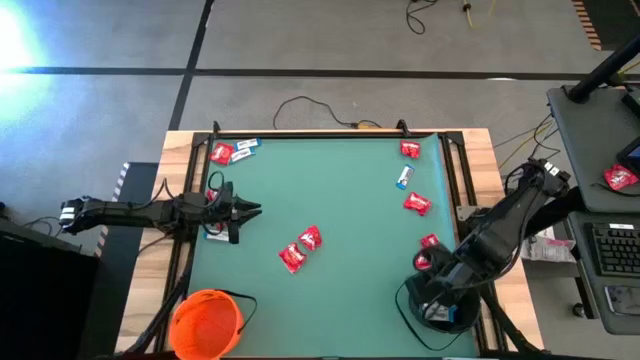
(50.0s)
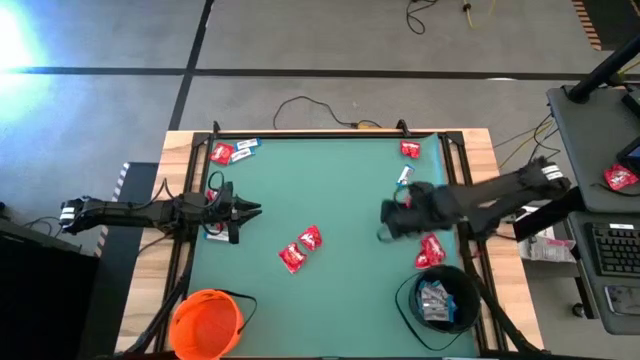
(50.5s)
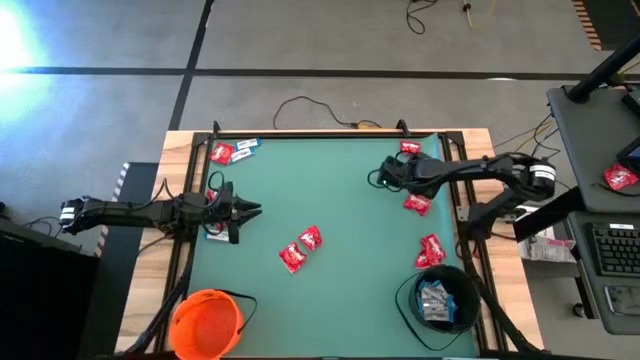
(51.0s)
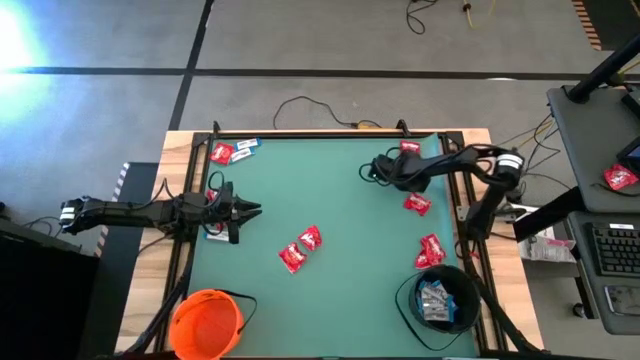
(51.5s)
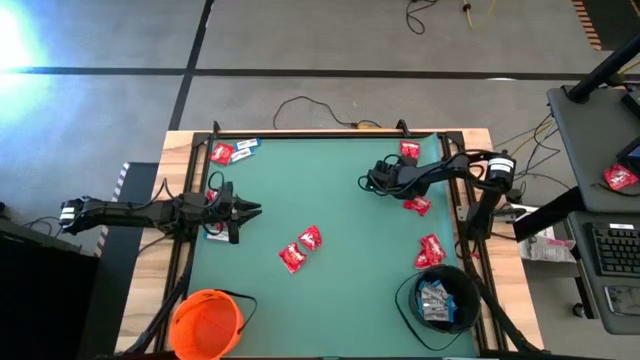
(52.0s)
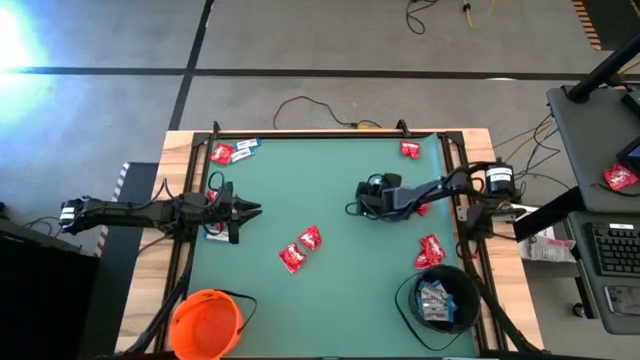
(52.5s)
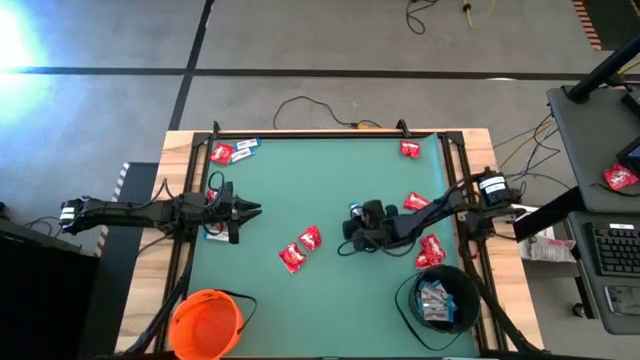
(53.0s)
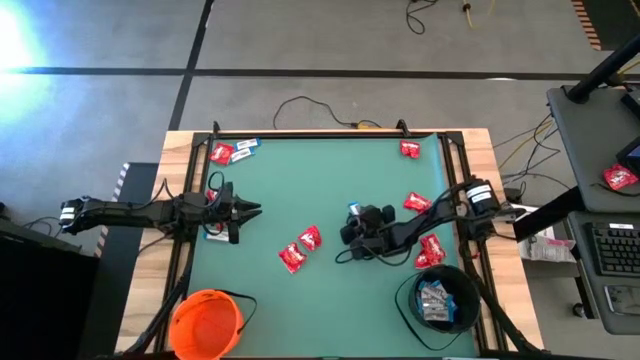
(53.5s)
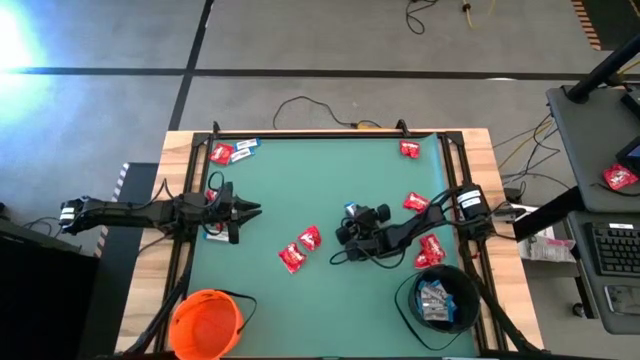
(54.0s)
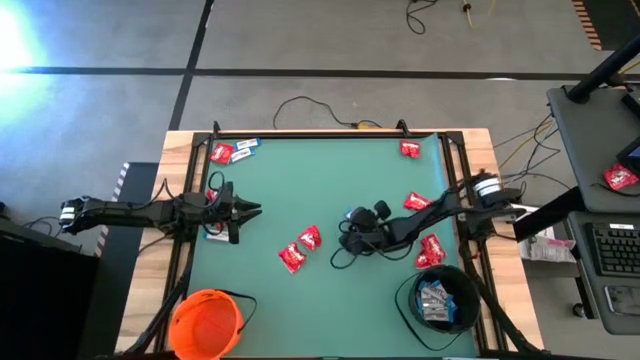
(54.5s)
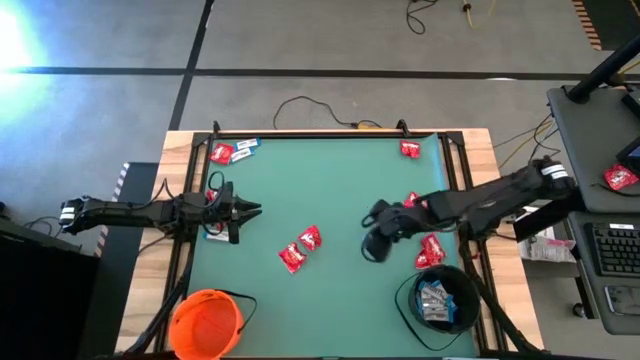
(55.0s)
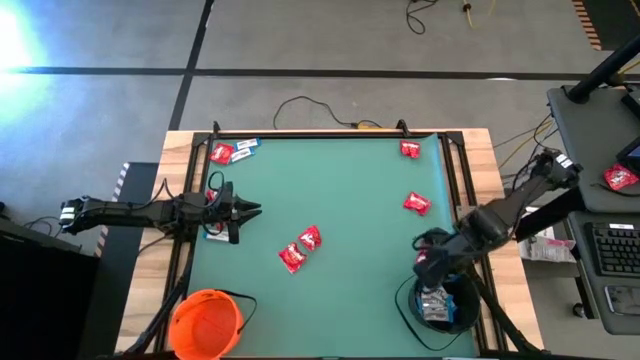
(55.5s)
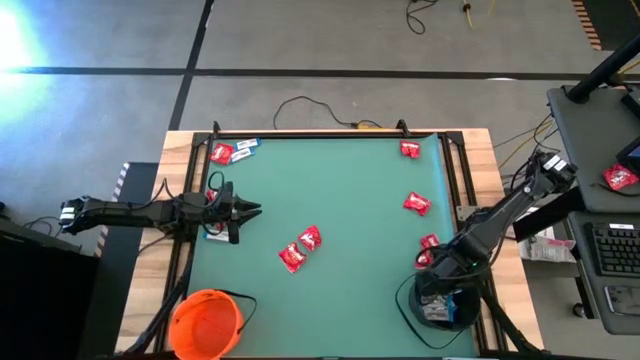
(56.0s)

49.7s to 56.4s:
Task: Sort candy by brand, put in halloween buckets
Put the white chocolate into the black bucket

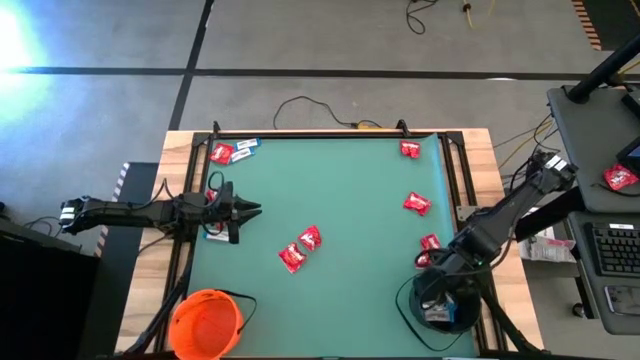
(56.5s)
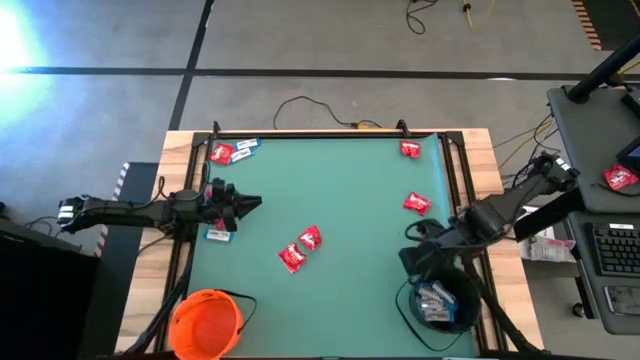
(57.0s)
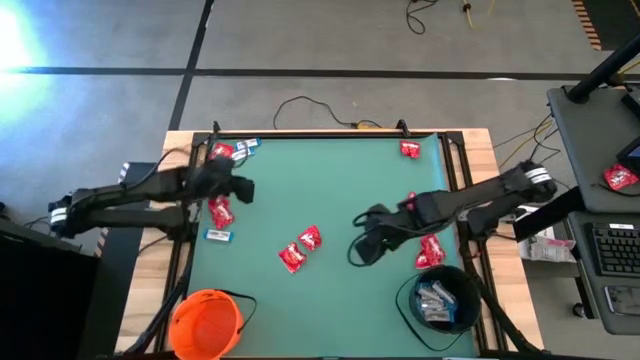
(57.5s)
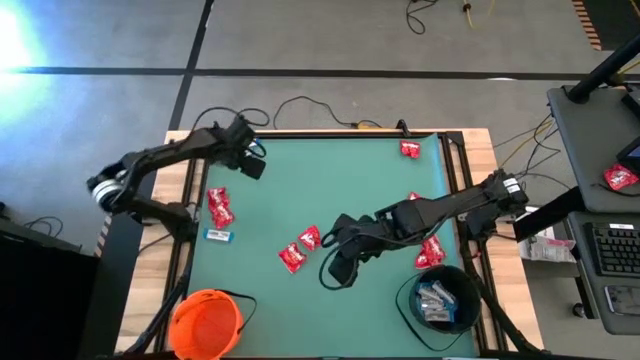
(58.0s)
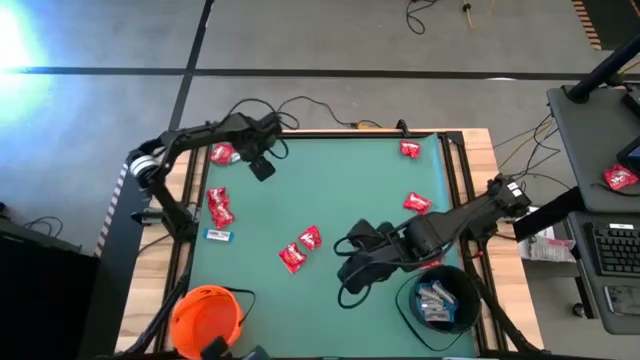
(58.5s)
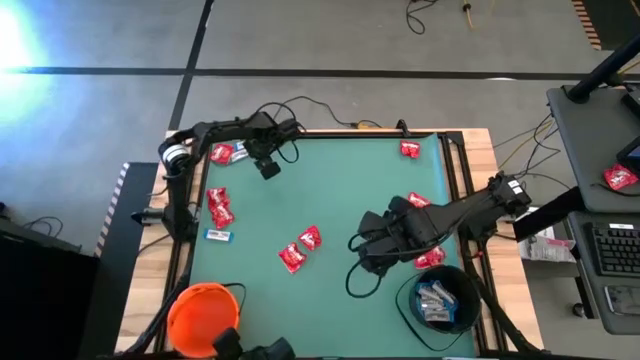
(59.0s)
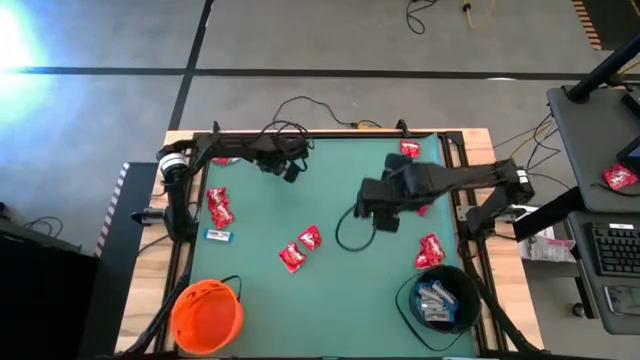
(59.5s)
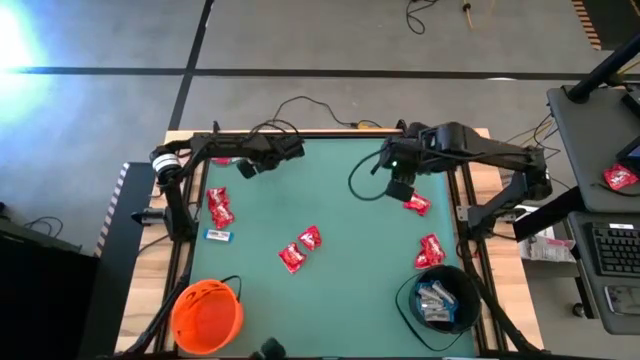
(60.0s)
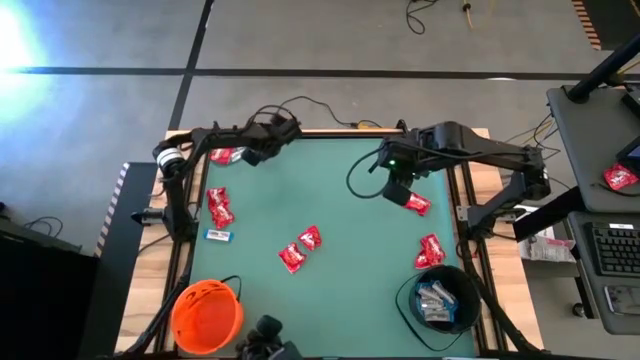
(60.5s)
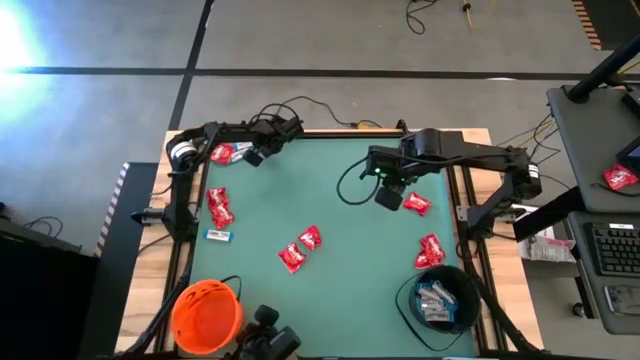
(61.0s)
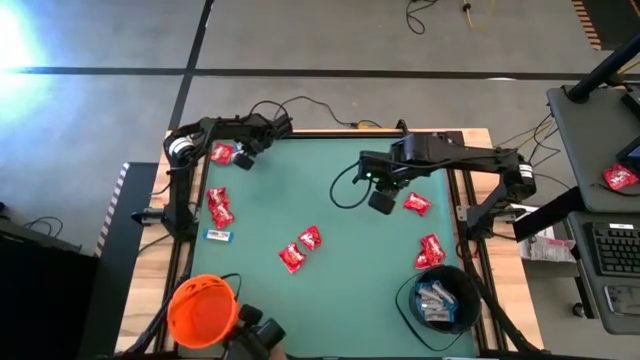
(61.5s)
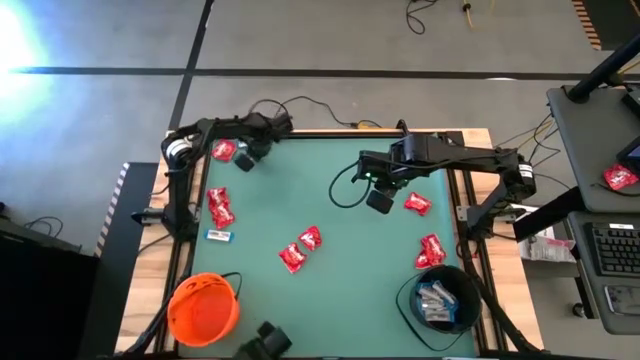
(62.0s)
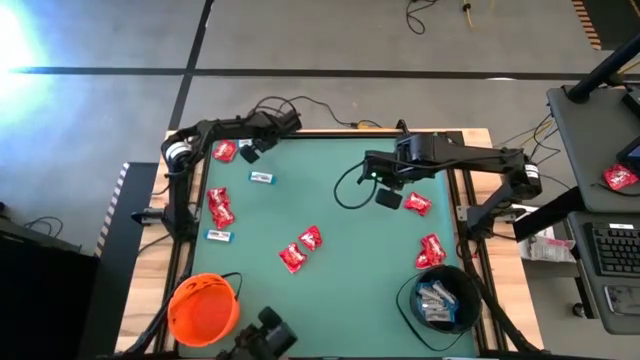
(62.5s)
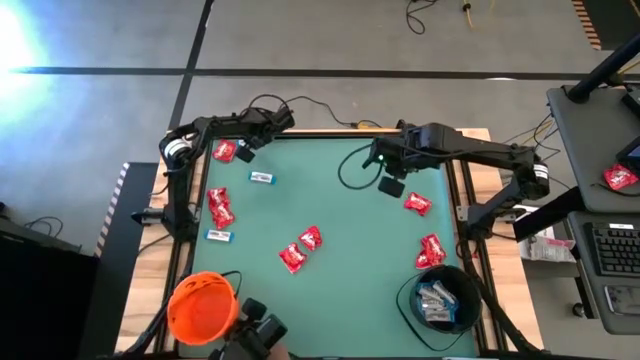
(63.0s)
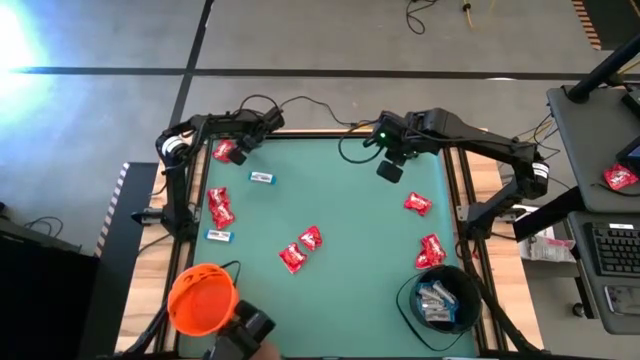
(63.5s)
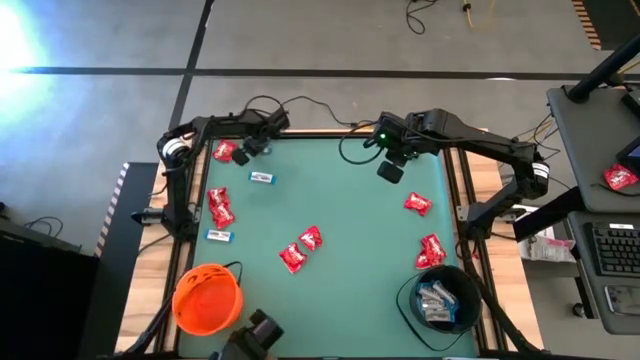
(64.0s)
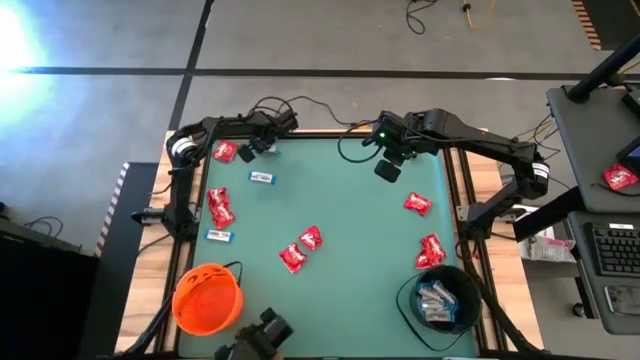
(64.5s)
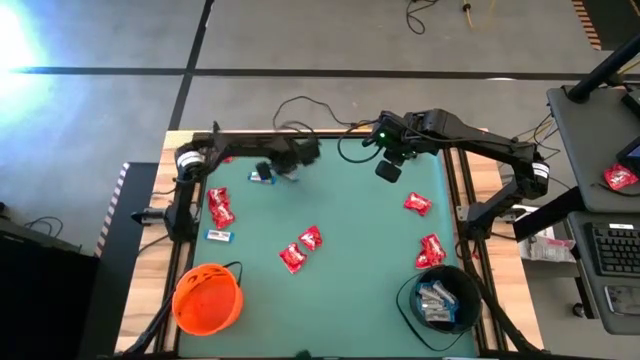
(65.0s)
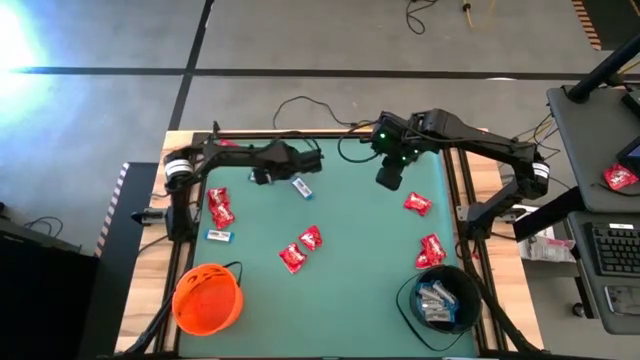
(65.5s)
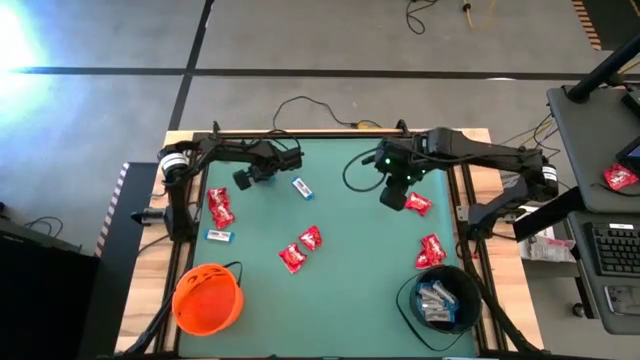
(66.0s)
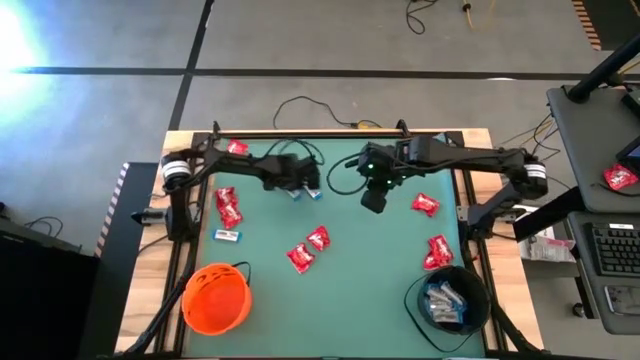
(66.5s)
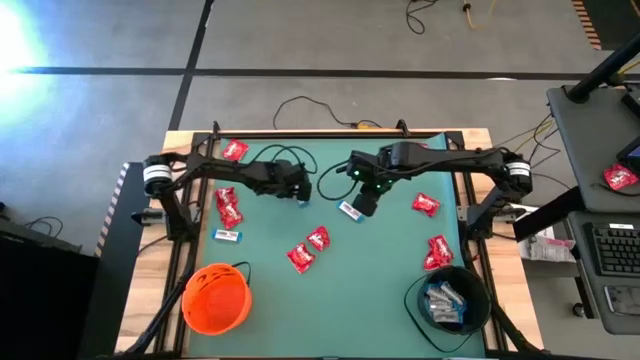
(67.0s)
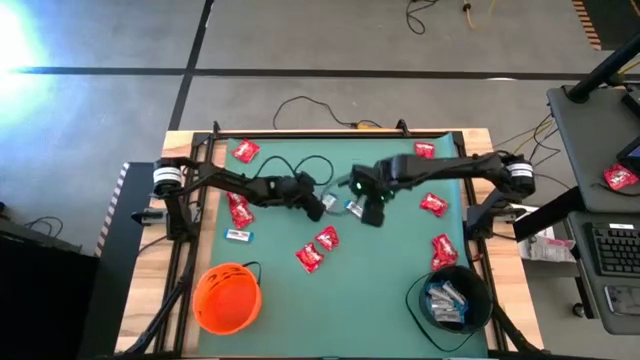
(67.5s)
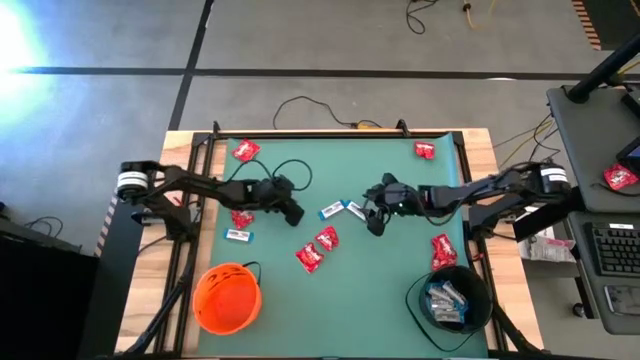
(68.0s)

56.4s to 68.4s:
Move the white chocolates to the center of the table

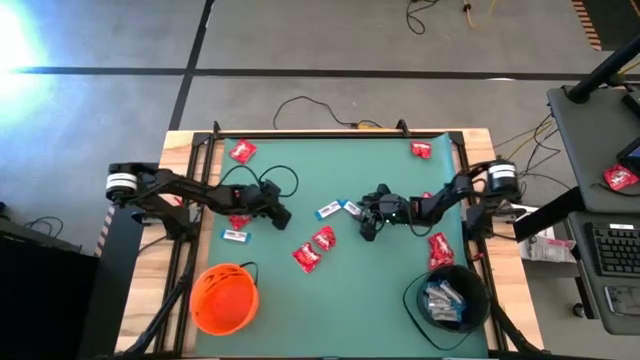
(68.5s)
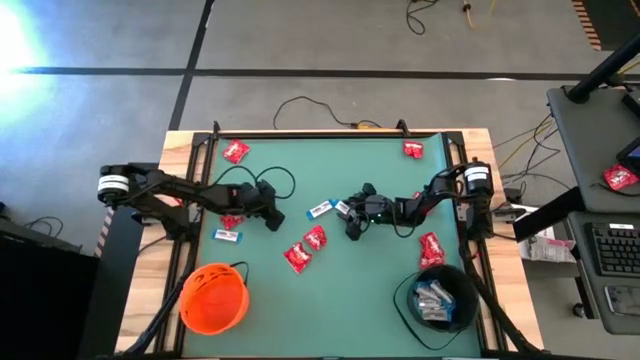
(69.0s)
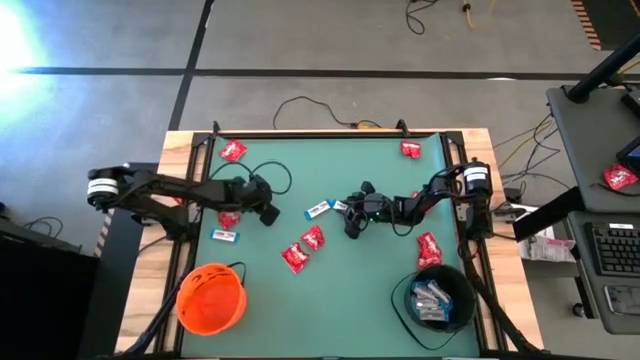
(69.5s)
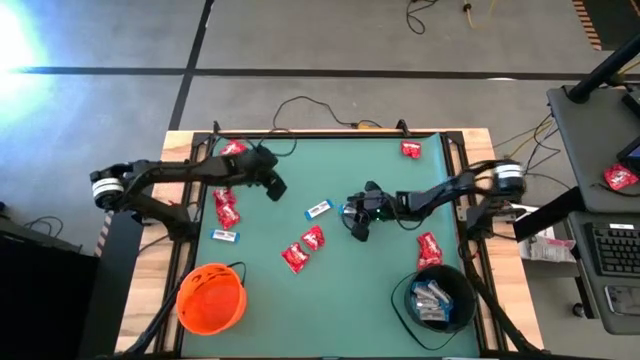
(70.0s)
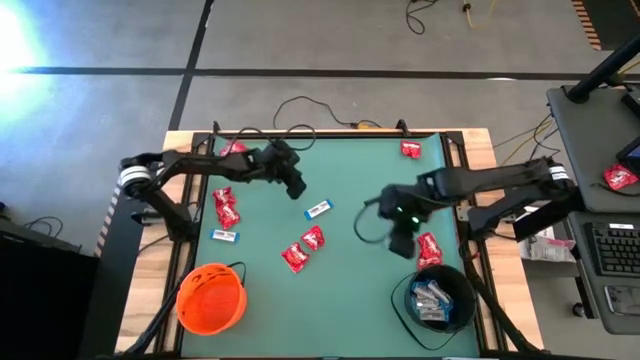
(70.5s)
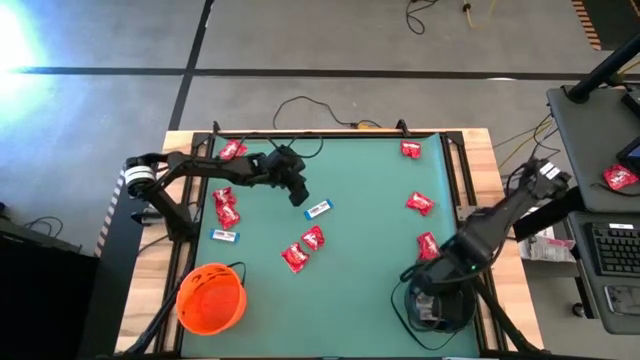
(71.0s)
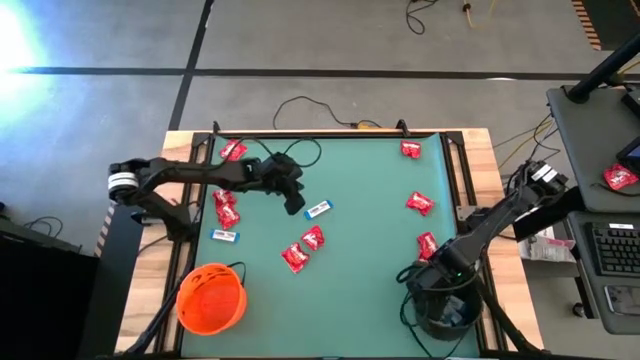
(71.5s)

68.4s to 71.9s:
Put the white chocolate into the black bucket

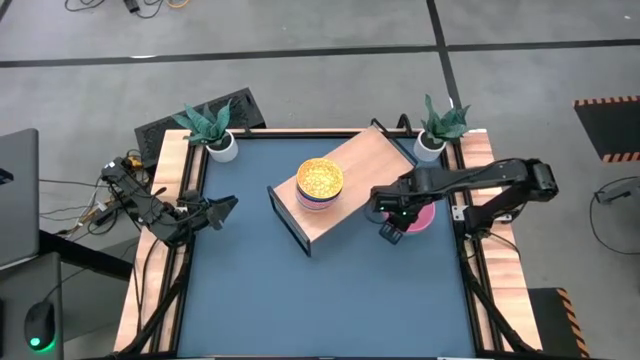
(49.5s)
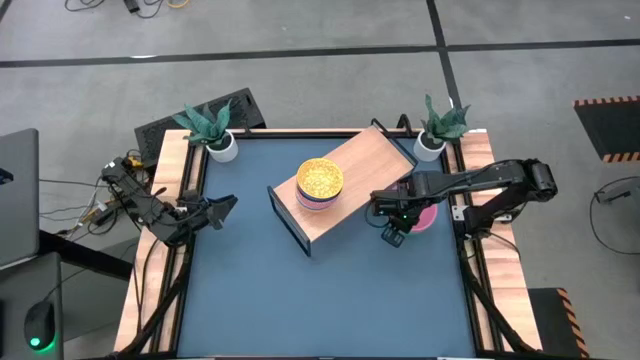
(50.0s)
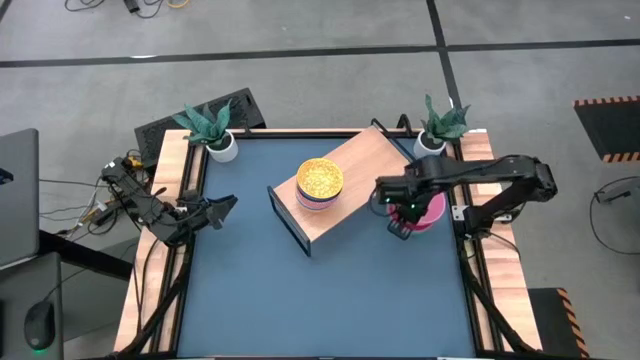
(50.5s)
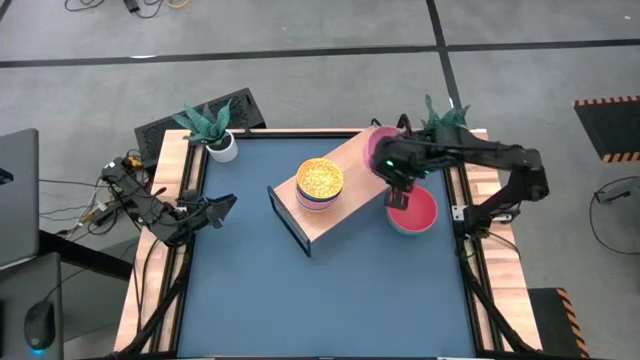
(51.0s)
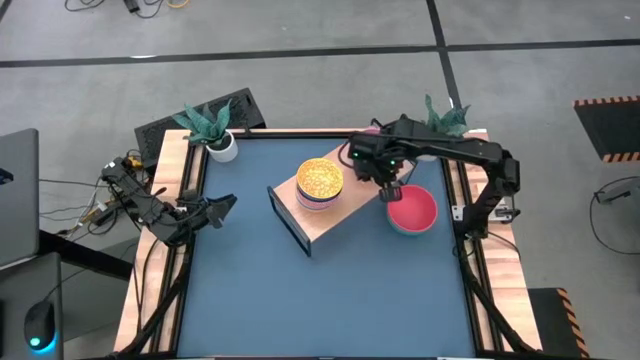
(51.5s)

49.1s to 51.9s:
Task: Place and stack bowls onto a shelf
Put the pink bowl on the shelf
